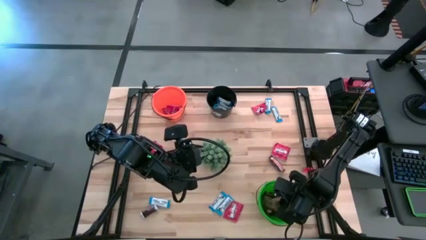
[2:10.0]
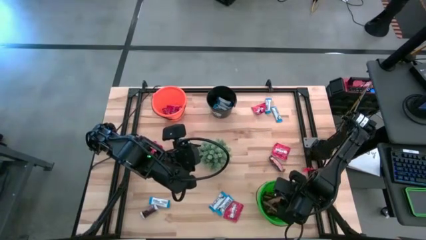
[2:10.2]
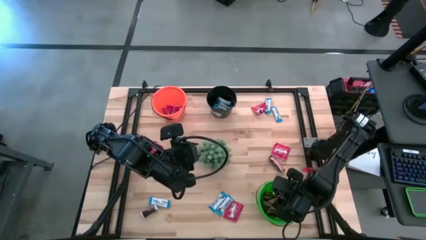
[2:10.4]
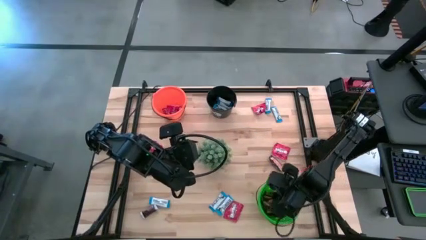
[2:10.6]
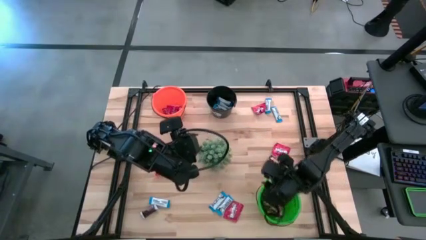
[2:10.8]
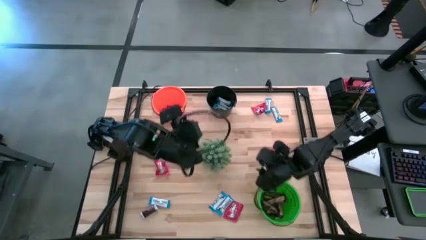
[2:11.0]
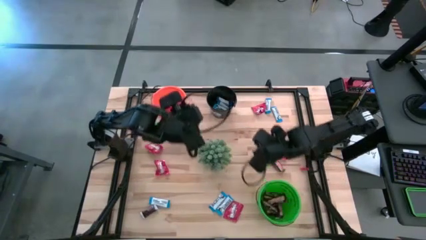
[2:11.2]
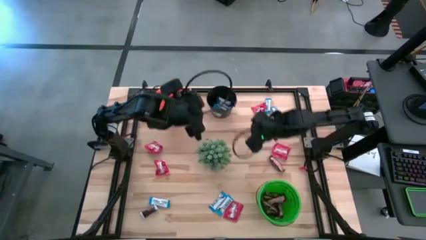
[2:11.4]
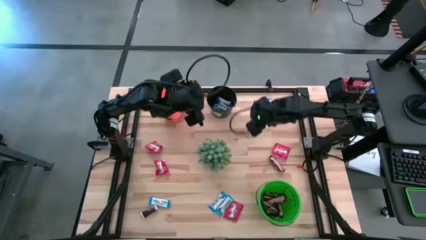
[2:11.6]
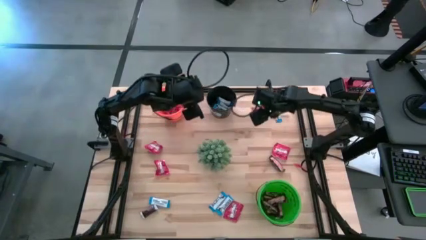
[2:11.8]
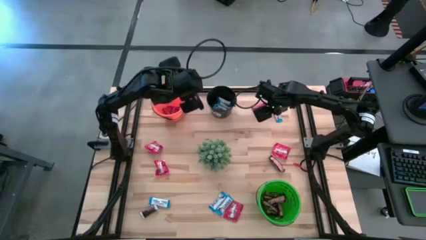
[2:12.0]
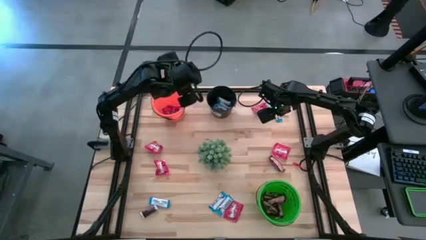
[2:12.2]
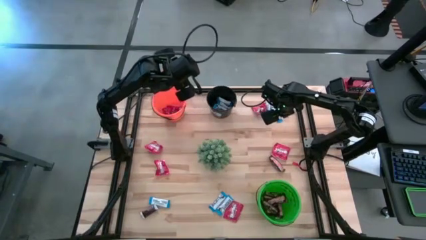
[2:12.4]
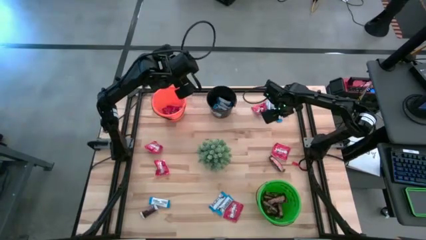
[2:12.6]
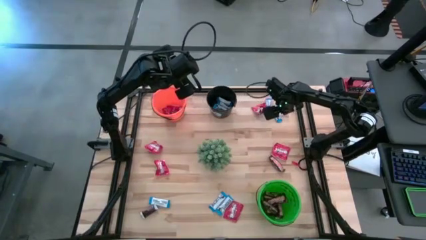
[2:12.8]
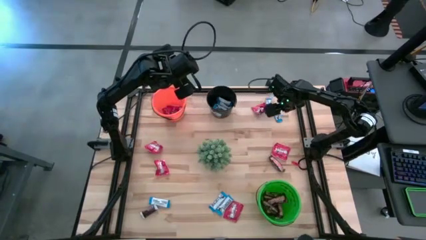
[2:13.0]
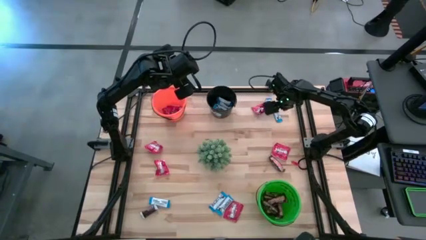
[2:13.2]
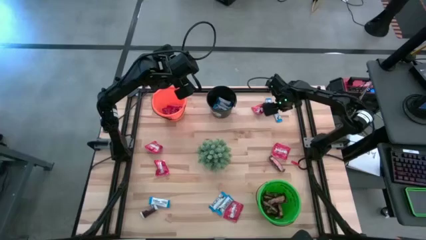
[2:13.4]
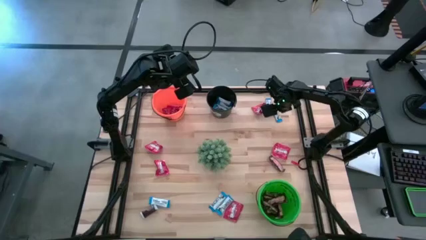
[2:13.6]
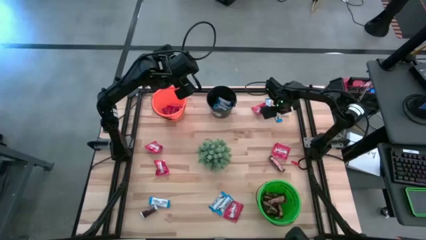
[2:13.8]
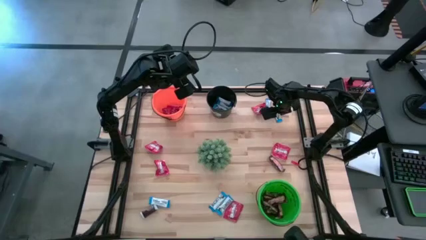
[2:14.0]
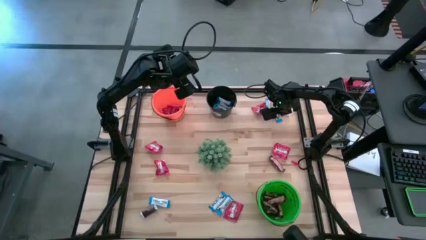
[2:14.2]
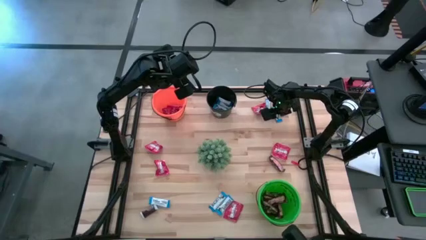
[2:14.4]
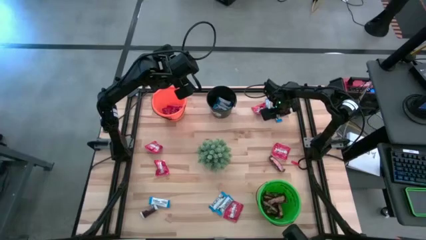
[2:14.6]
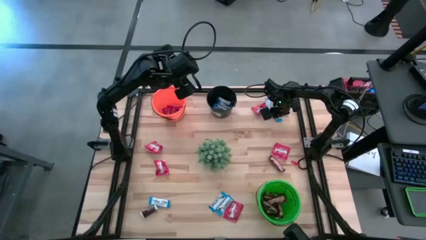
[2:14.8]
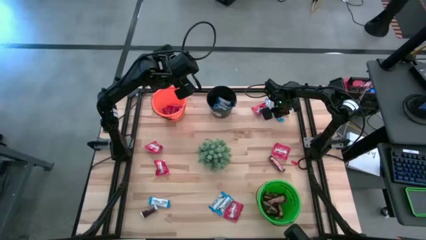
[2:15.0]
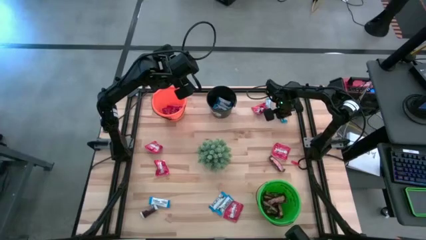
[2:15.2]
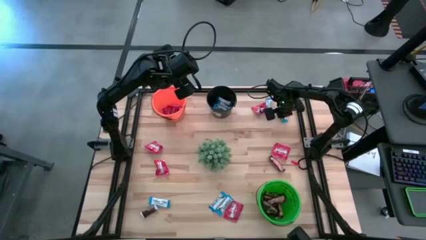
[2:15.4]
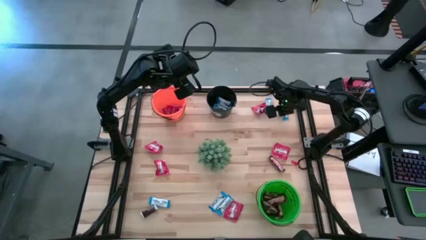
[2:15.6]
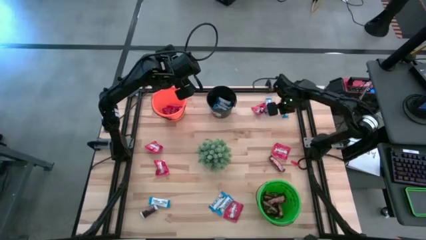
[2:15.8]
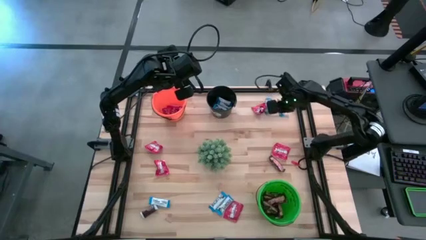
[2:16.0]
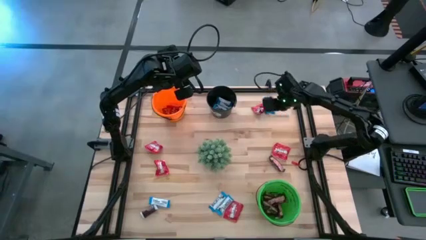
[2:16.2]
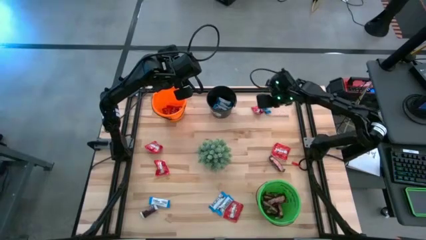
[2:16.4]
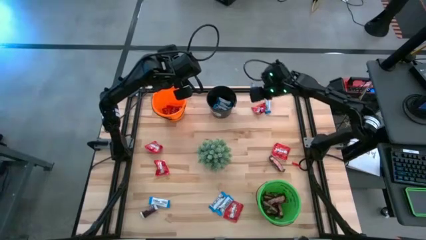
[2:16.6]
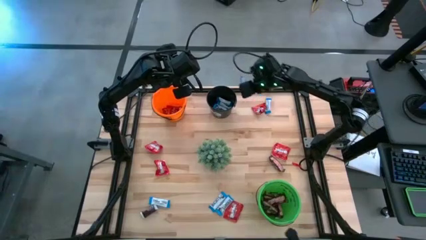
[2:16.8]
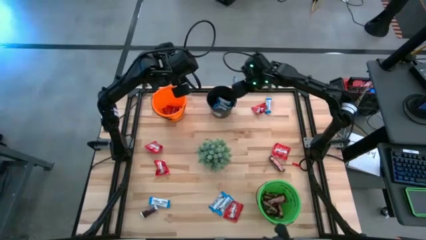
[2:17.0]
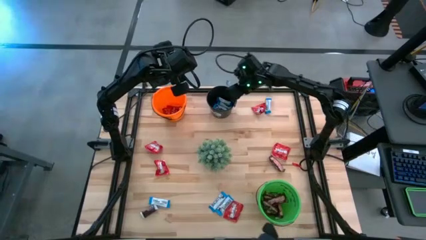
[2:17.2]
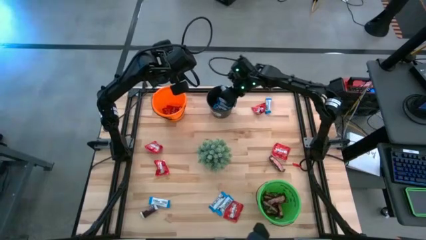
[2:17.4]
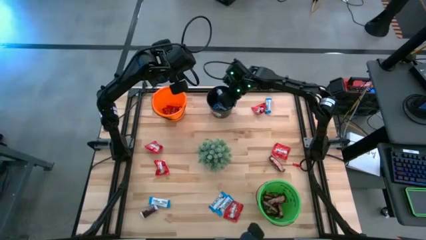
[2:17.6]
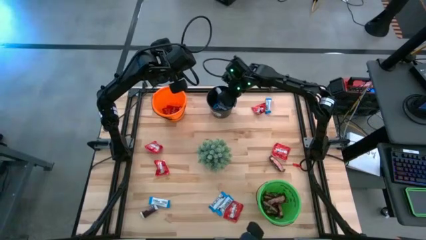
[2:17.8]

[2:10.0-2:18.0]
Task: Organize candy in baskets
Put the white chocolate bar into the black bucket

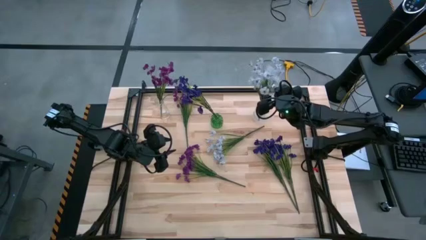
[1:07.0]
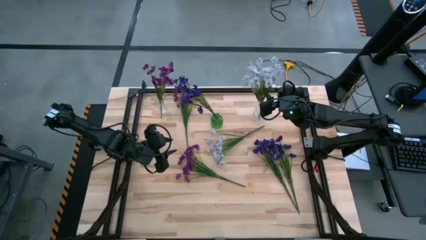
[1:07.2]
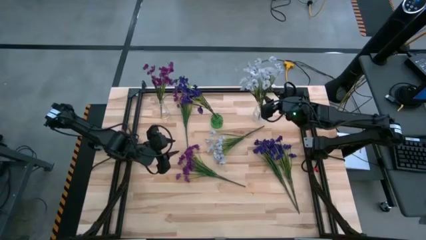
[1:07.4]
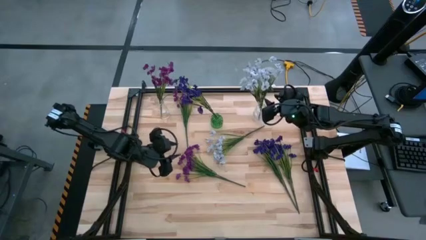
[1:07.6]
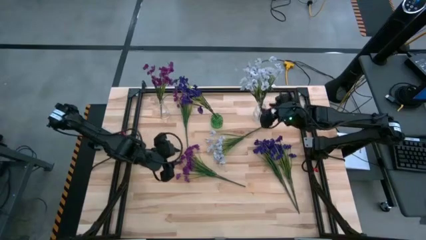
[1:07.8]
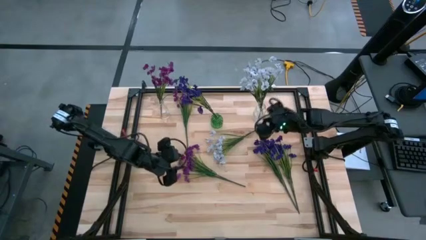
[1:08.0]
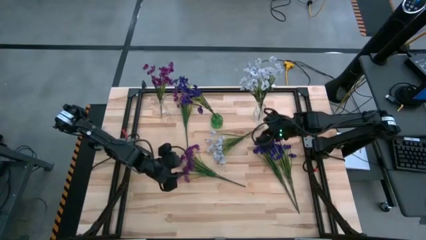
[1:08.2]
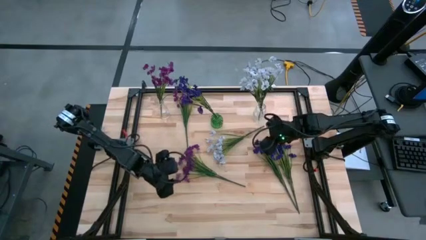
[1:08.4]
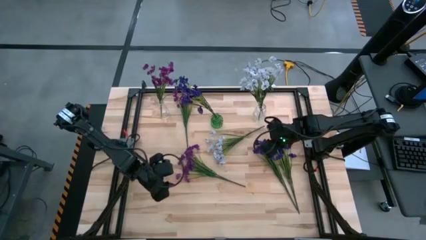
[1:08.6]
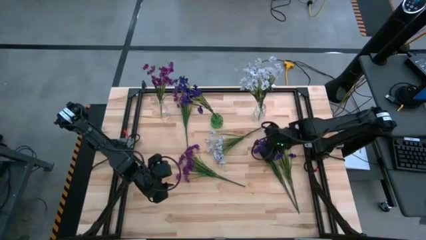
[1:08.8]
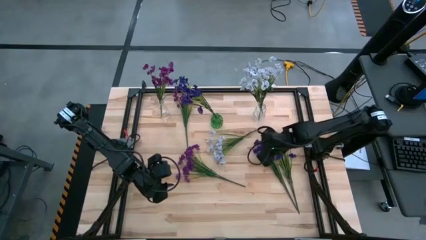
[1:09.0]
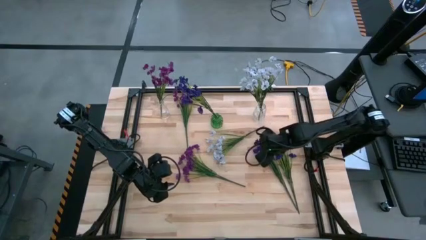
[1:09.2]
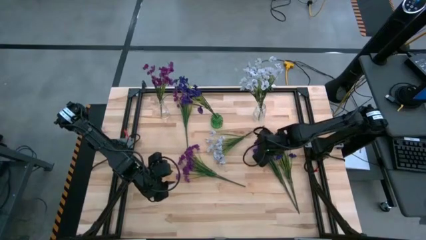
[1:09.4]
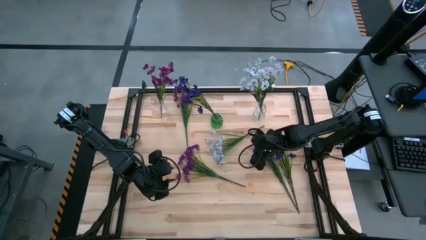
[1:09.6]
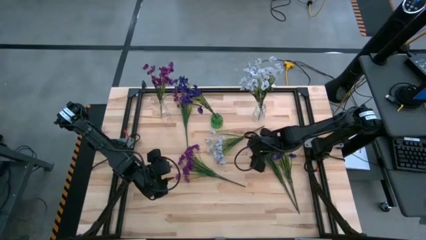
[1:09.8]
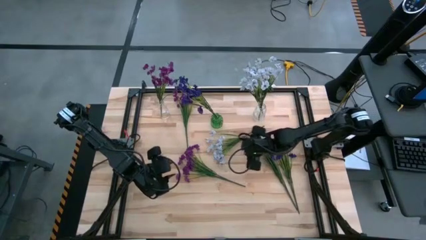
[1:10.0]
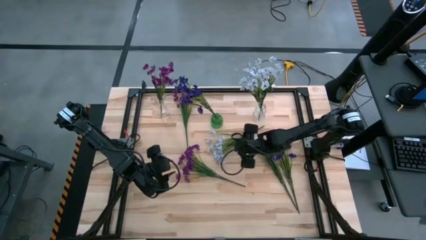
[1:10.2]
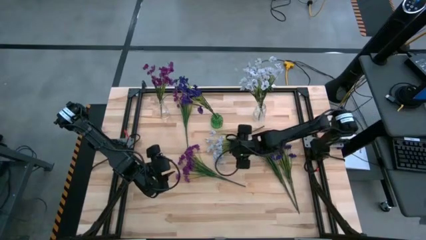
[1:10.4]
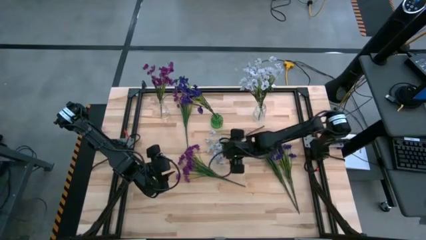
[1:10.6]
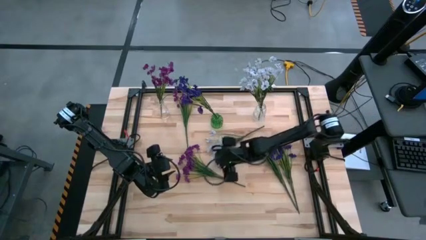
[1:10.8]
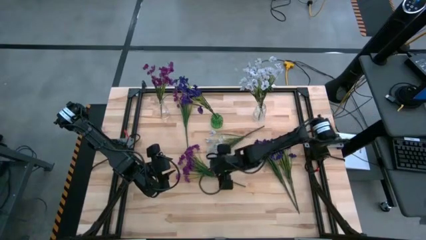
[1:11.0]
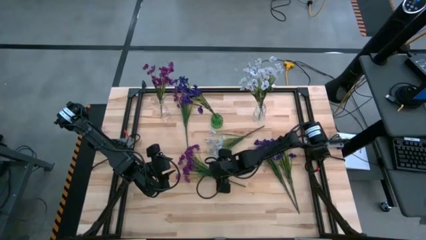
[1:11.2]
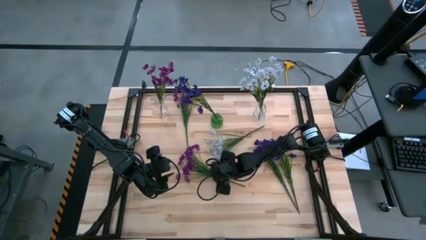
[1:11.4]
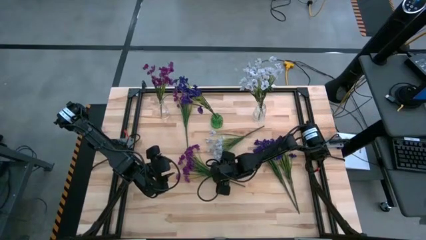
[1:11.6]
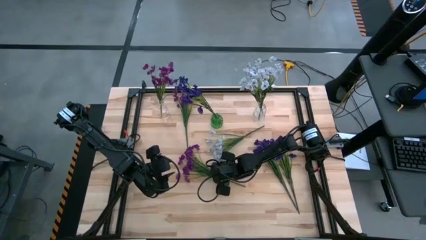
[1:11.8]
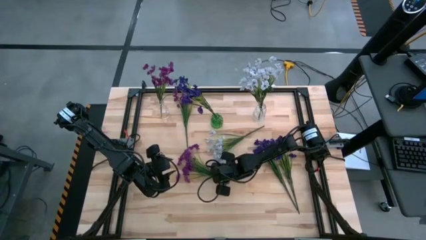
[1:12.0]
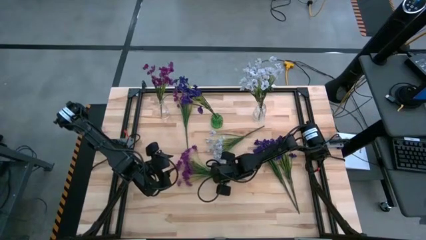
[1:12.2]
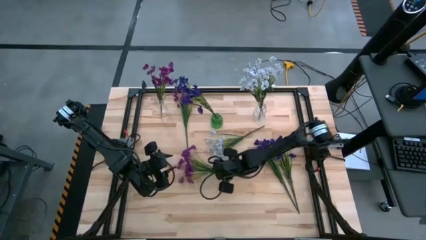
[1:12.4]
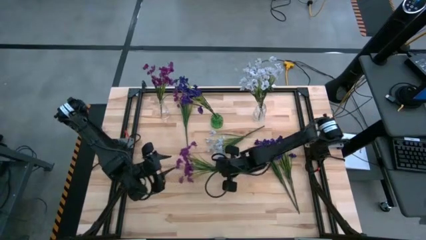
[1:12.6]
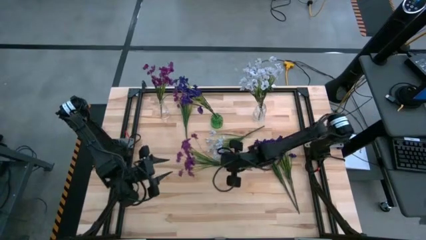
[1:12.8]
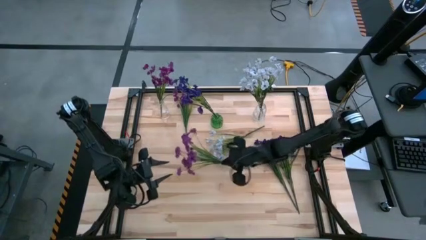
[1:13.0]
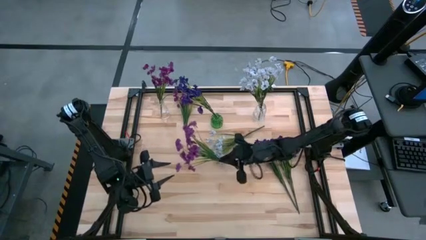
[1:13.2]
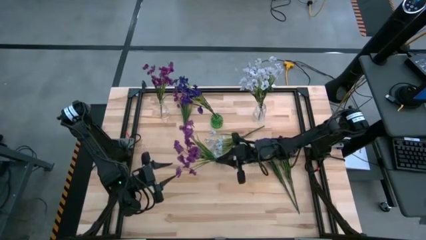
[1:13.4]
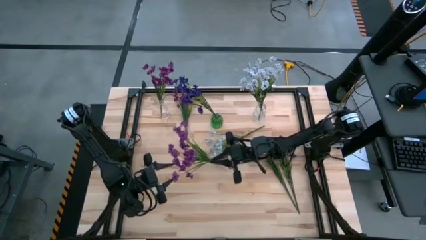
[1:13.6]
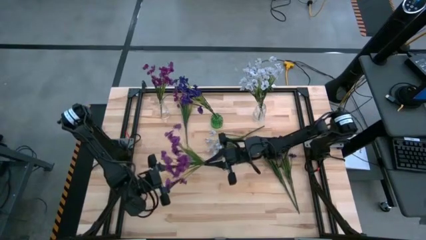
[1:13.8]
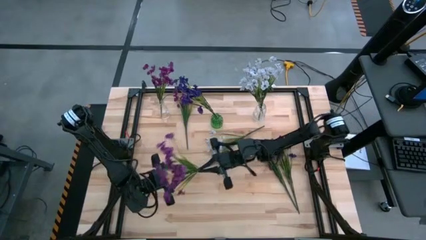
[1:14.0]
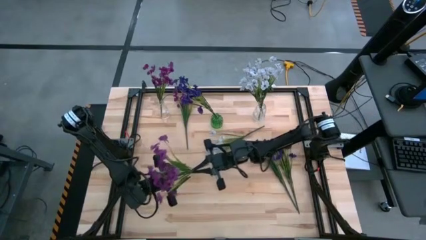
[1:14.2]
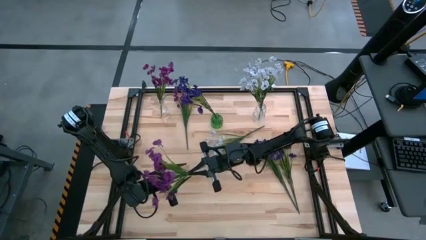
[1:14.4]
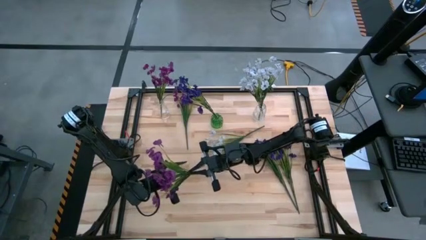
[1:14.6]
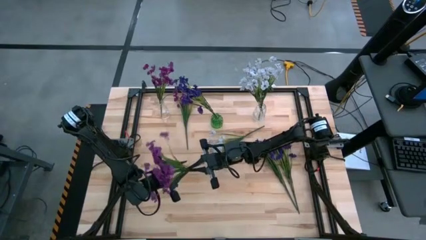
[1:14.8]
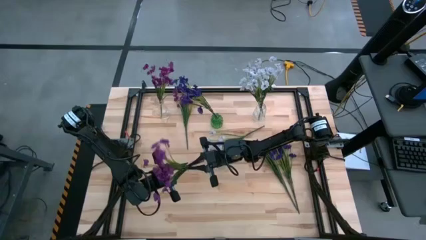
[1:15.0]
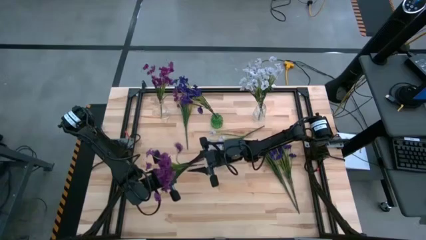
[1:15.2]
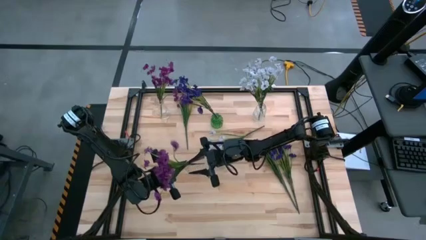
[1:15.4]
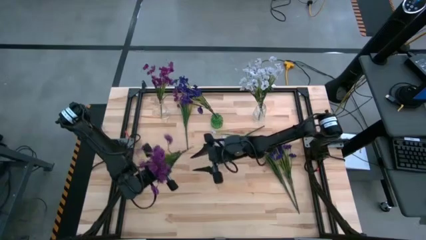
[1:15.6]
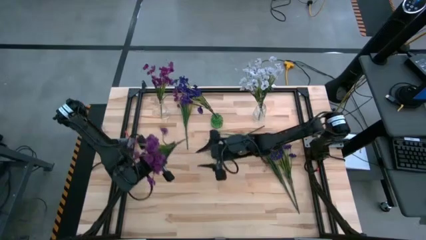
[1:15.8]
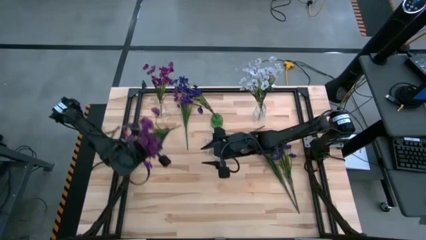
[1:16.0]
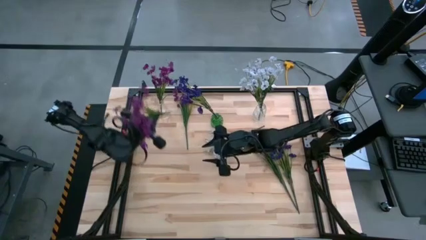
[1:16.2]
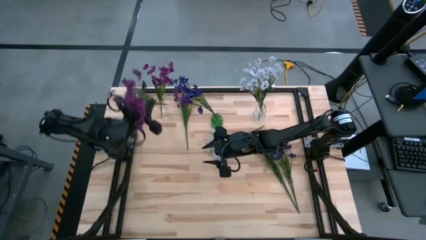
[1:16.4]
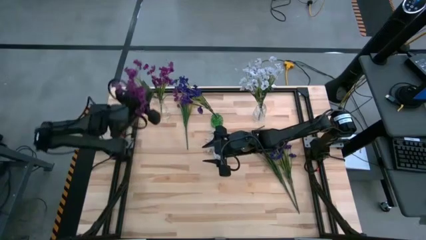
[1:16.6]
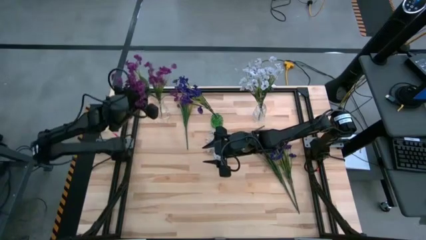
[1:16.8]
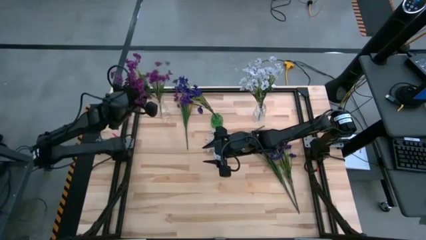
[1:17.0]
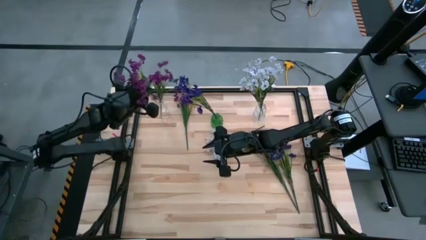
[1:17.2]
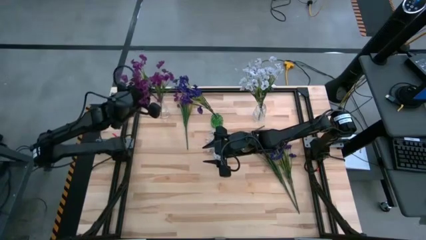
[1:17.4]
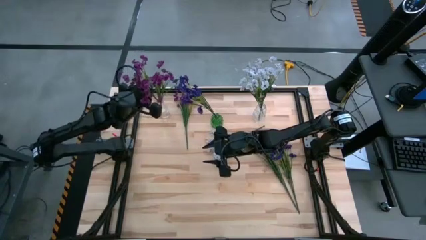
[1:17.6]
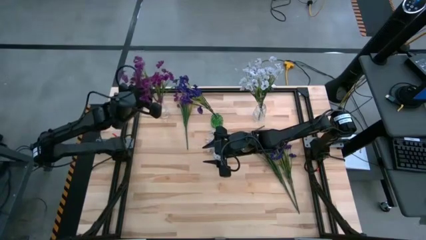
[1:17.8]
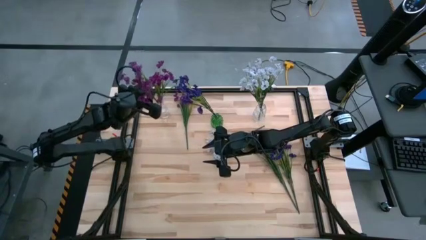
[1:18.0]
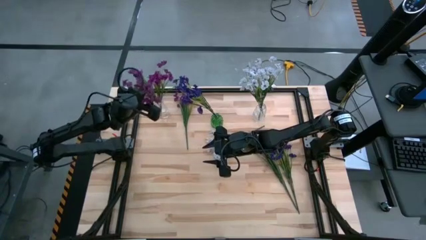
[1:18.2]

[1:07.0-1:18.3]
Task: Sort flowers into vase by color
Put the bottom violet flowers into the left transparent flower vase
